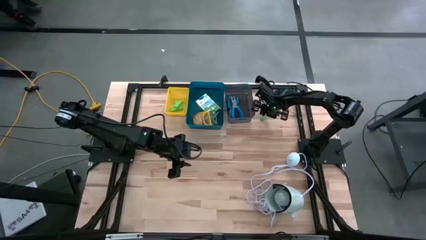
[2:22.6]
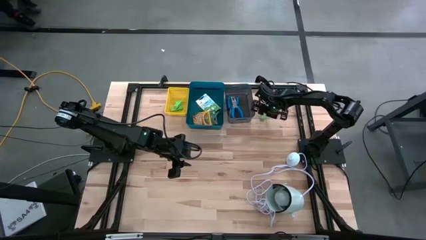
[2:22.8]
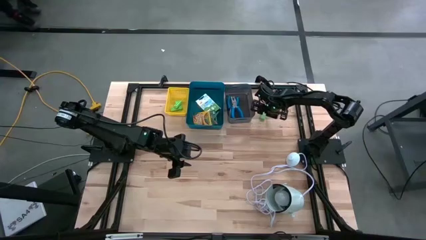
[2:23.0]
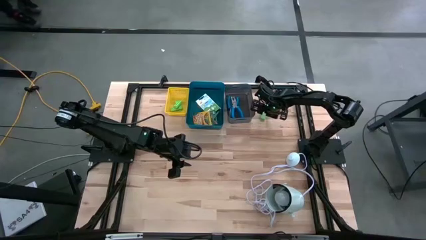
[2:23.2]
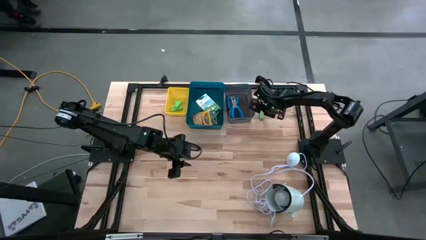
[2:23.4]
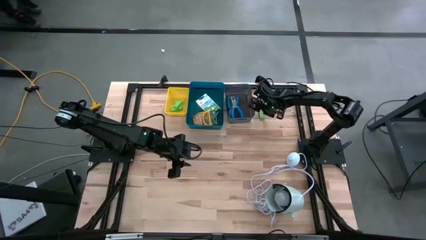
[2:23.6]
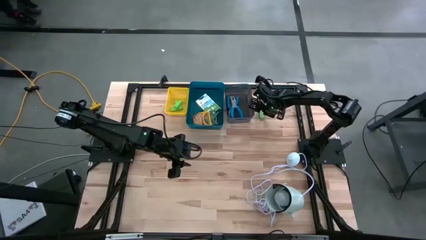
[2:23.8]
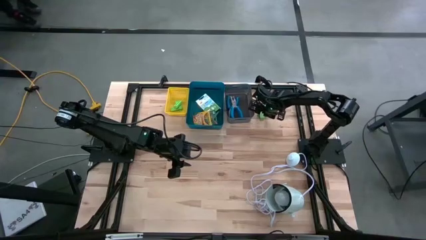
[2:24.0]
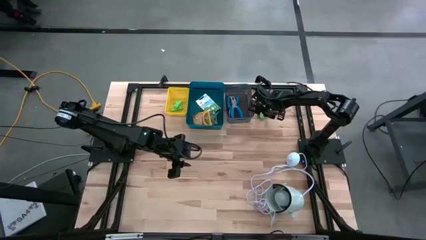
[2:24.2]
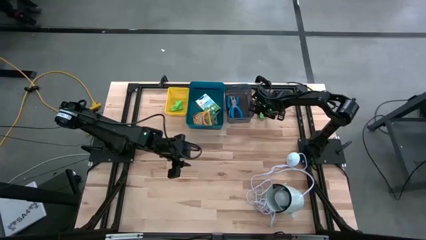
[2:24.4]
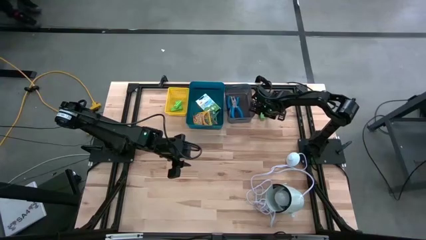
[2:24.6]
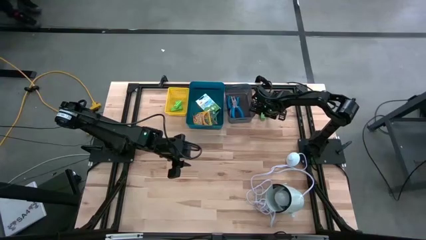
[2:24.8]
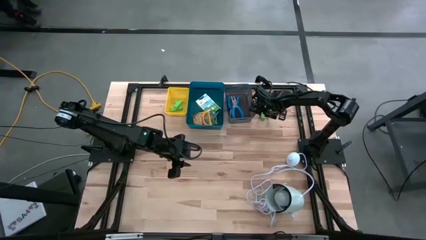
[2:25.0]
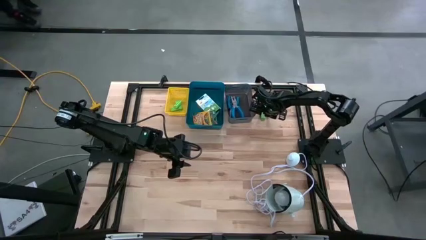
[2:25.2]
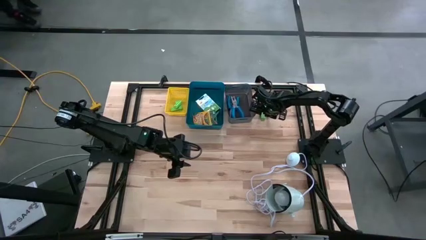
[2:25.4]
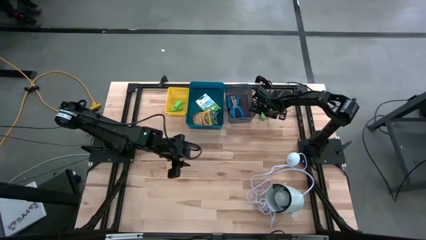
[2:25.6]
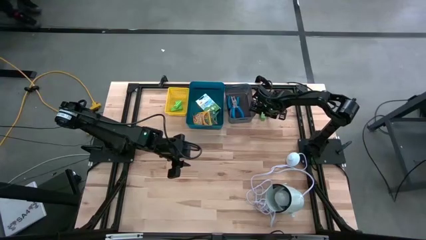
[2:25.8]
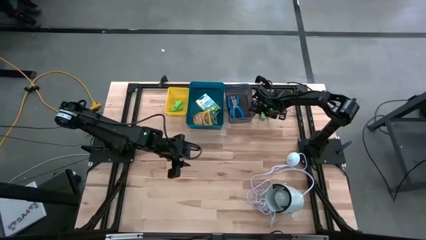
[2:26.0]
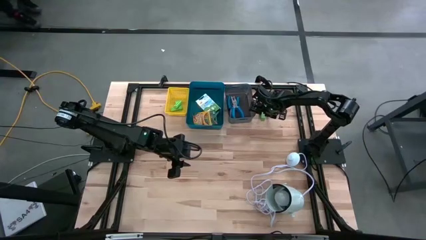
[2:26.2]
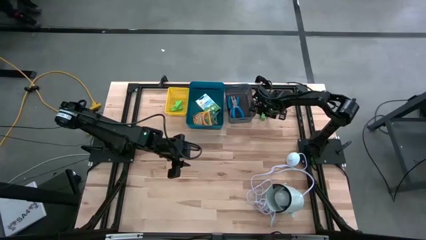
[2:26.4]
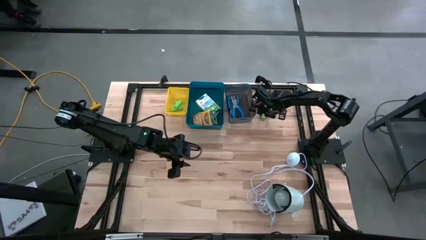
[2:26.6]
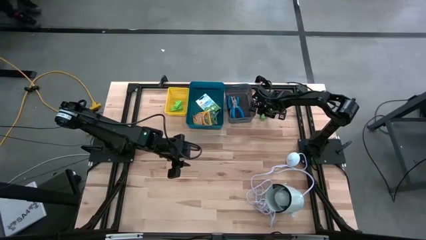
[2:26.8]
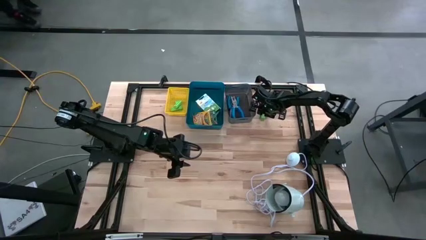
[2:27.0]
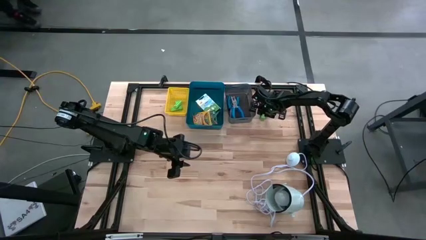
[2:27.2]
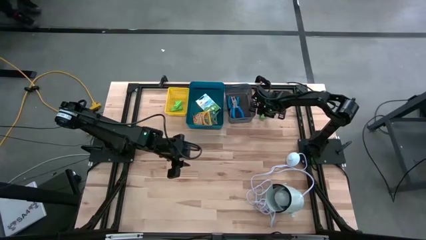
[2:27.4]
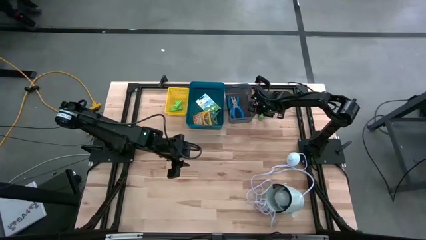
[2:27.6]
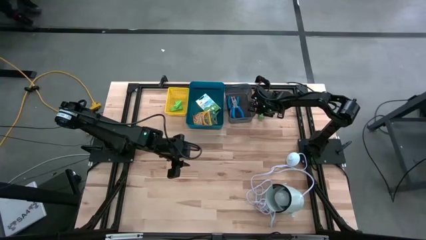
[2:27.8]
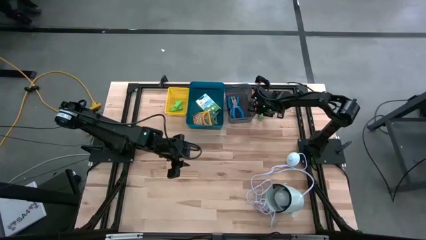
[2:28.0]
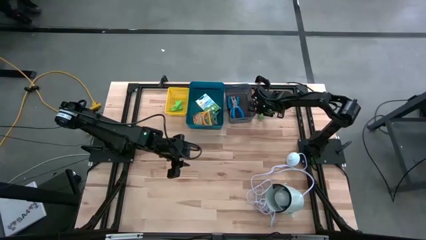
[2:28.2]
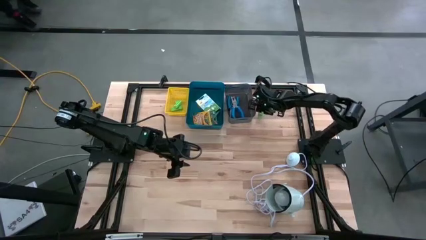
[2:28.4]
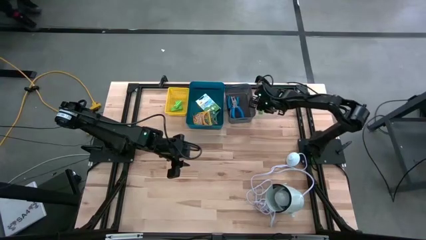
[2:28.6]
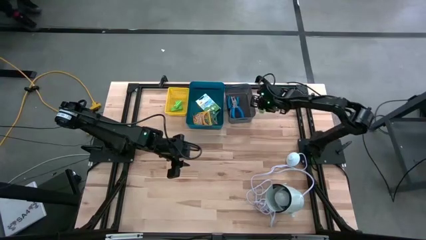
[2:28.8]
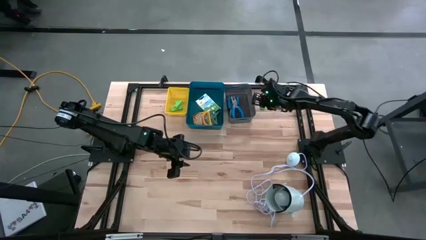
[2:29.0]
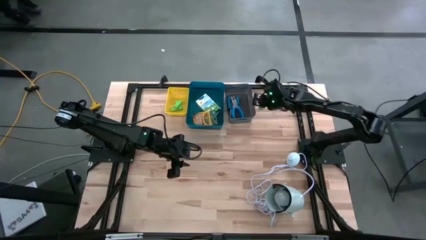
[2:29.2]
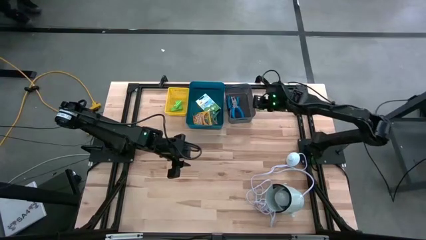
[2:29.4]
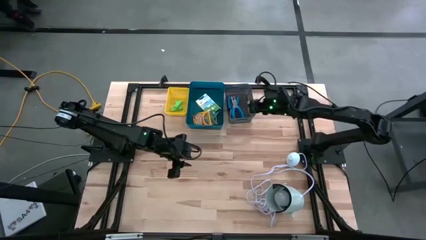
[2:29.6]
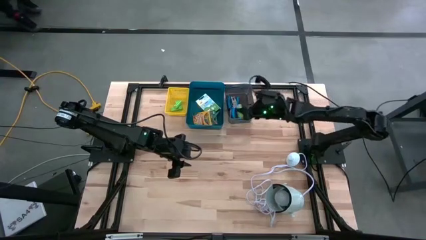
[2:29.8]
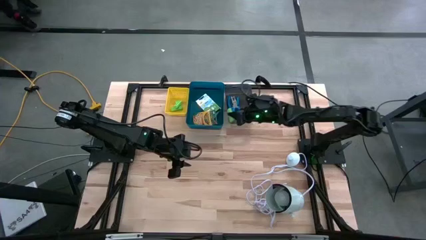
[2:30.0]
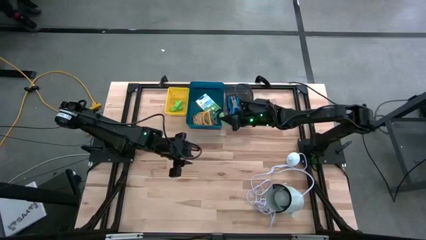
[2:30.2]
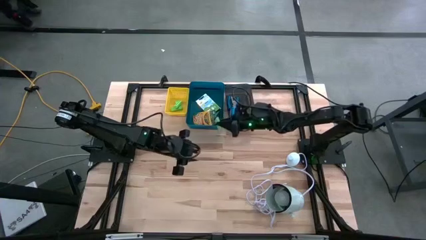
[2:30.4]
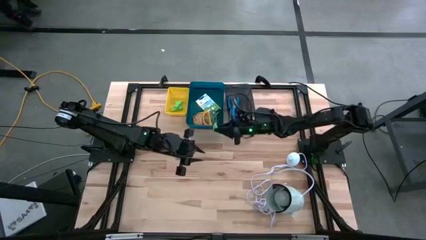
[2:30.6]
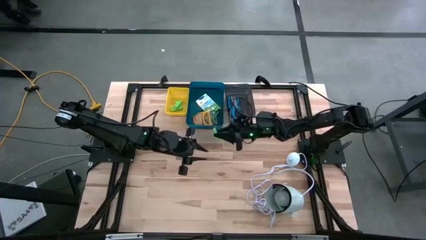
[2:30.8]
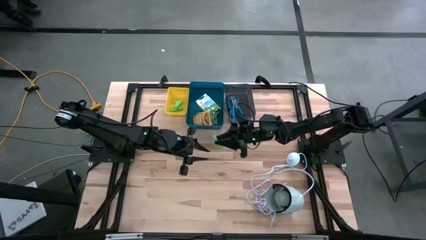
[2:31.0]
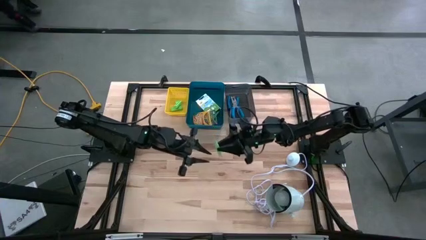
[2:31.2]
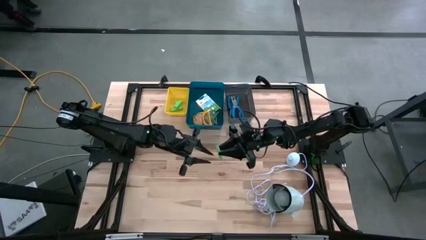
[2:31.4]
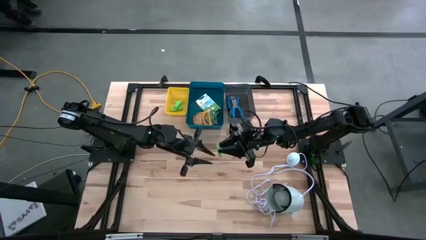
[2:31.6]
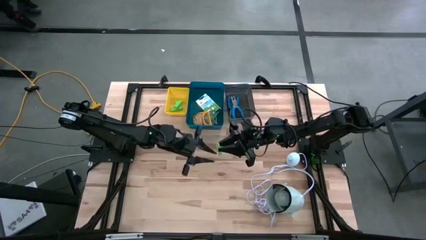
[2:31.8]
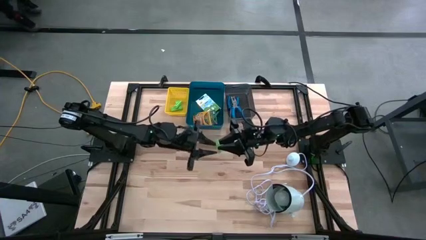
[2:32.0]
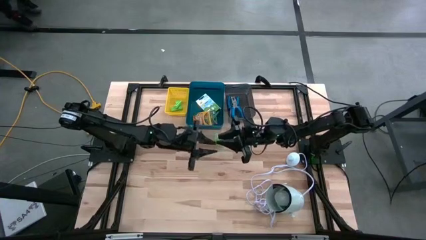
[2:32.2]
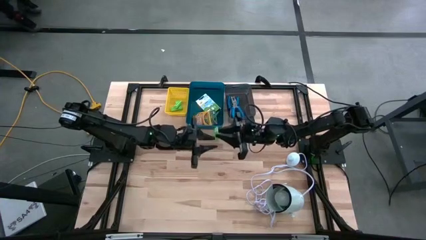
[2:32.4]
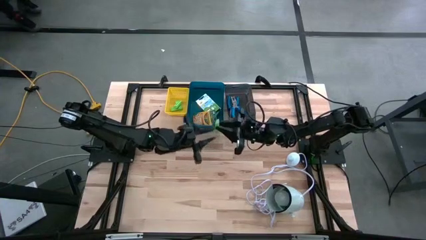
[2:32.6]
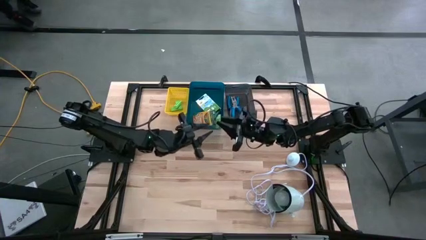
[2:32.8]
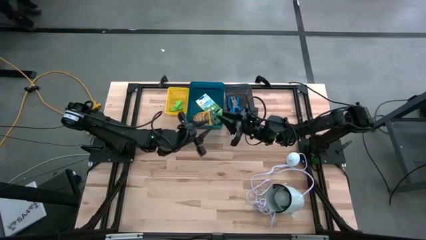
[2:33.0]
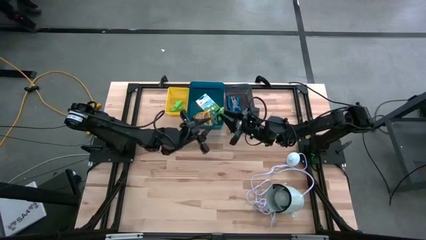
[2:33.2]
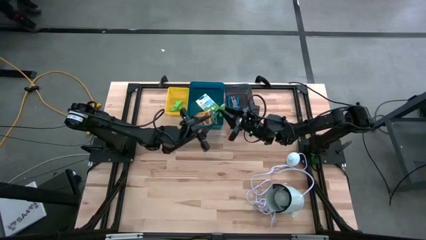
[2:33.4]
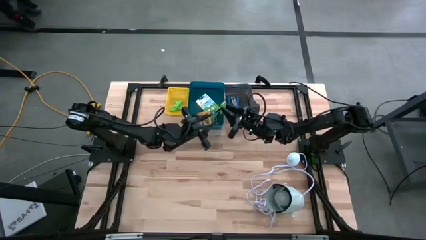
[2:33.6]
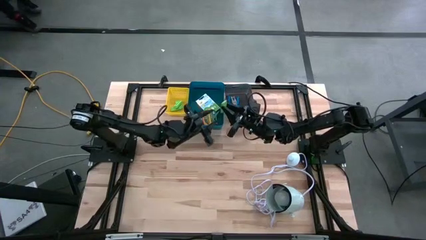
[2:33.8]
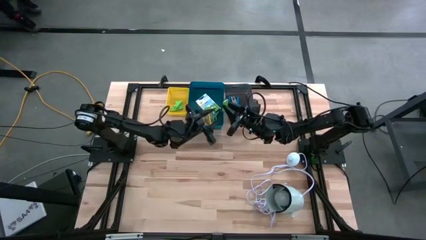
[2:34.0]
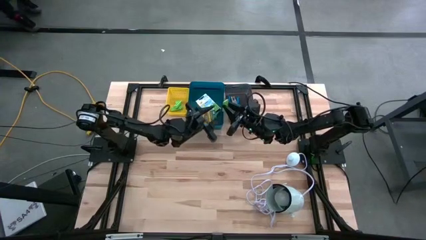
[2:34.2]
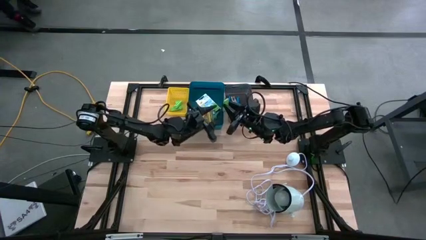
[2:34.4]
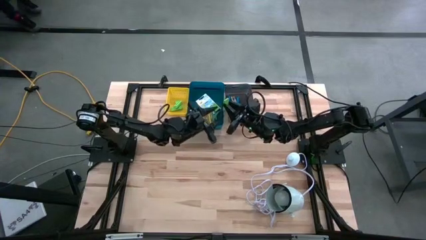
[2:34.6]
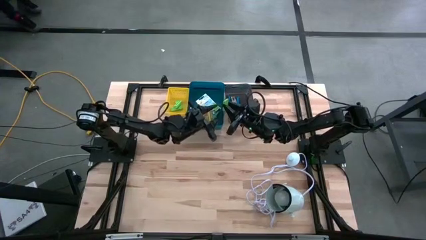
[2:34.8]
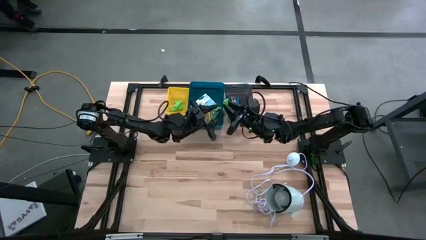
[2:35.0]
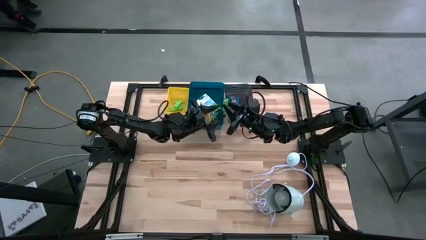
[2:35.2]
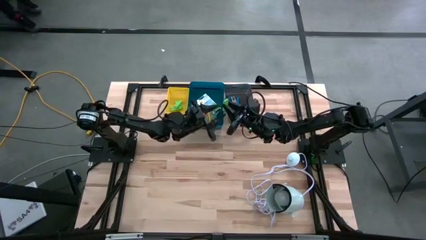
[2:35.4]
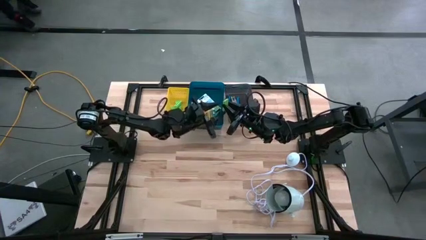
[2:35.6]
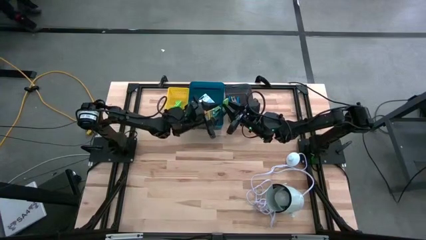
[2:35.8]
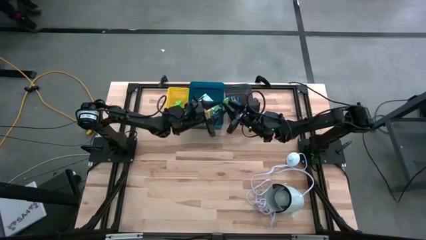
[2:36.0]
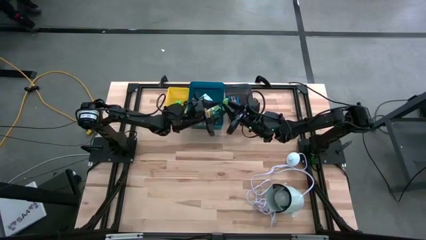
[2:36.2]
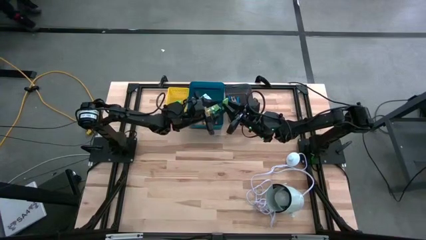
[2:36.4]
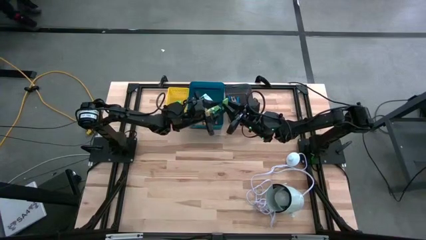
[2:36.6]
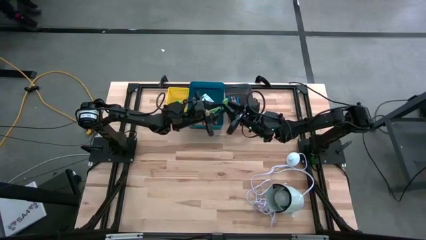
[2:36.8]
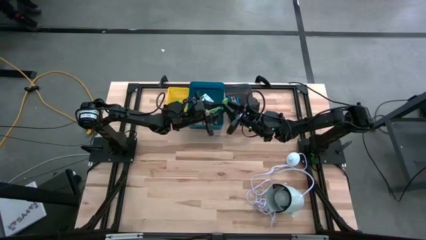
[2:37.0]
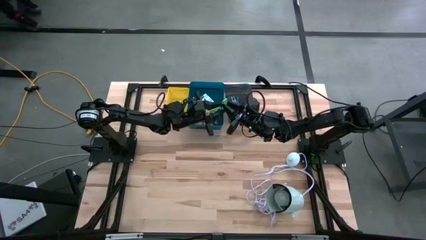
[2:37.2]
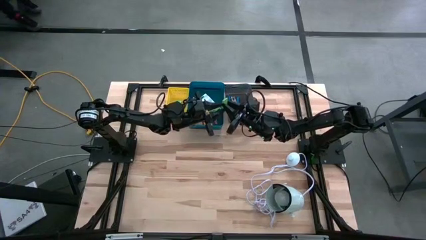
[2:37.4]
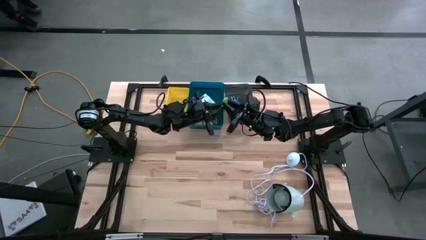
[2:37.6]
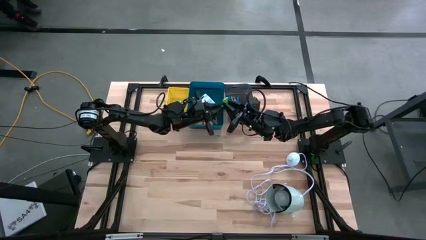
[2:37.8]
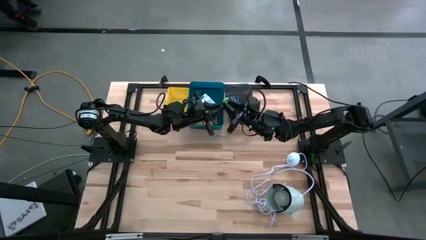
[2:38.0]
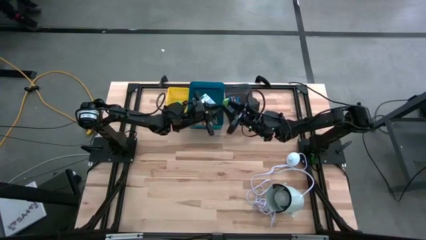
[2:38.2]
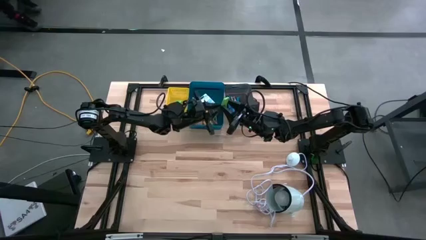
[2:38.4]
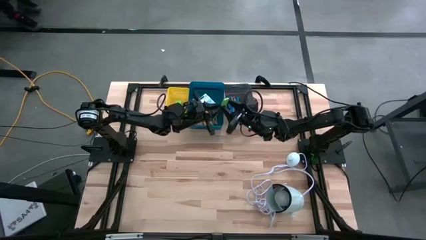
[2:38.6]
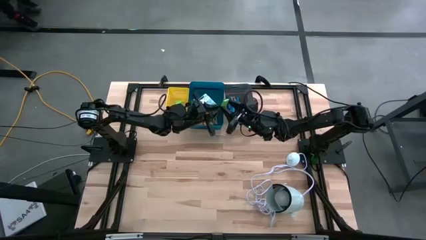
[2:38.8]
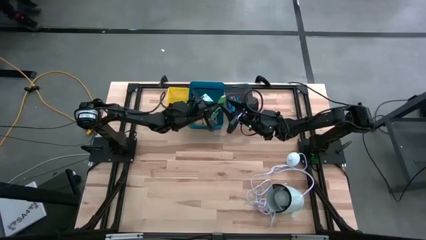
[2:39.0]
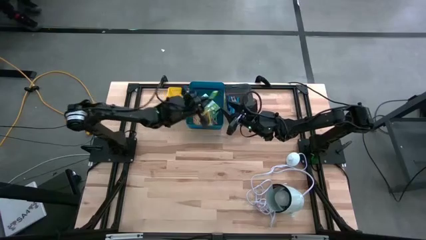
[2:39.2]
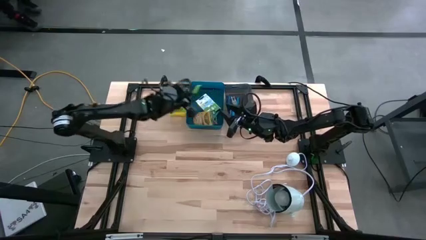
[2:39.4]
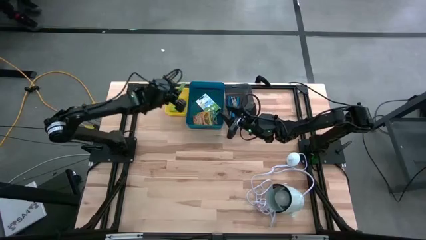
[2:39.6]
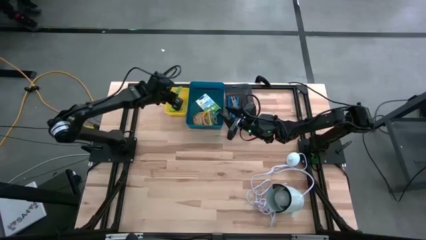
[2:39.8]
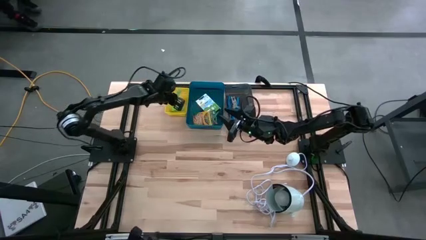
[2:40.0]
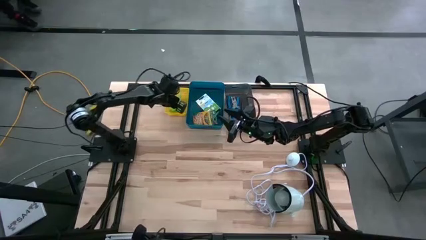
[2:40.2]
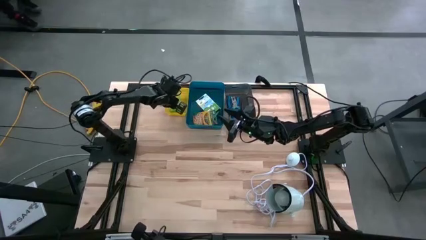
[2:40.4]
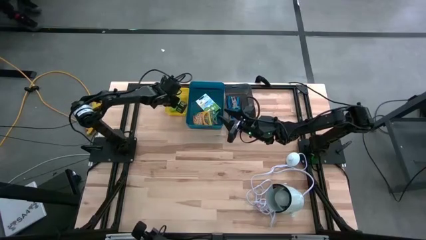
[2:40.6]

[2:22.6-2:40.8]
Task: Pick & Place School Supplies
Put the green eraser into the yellow bin
